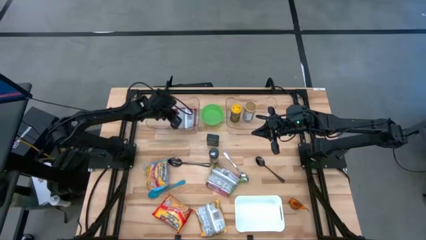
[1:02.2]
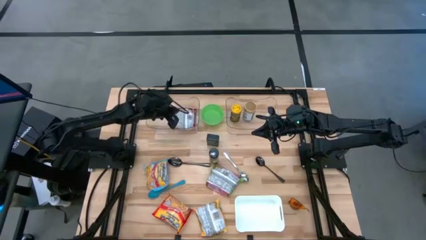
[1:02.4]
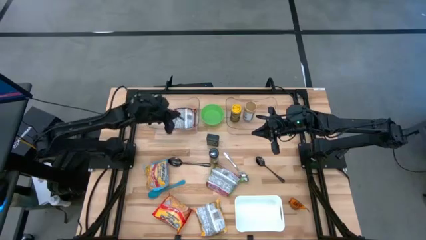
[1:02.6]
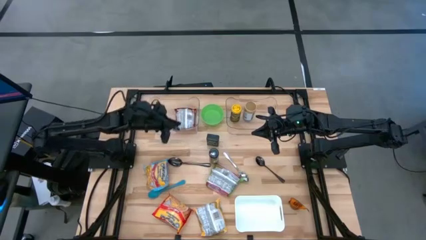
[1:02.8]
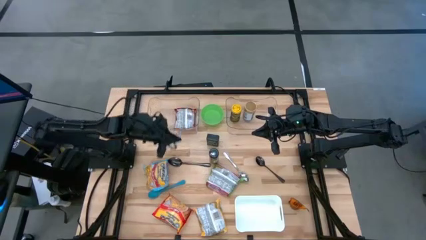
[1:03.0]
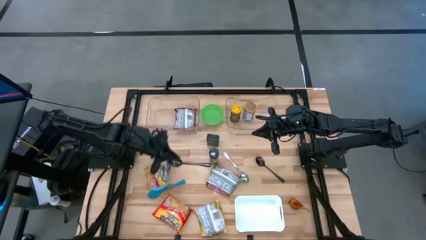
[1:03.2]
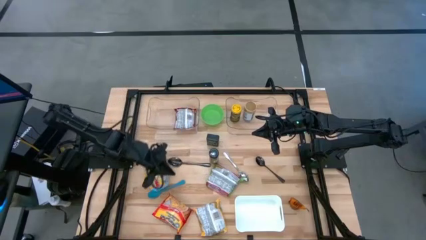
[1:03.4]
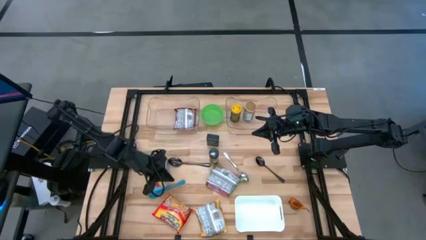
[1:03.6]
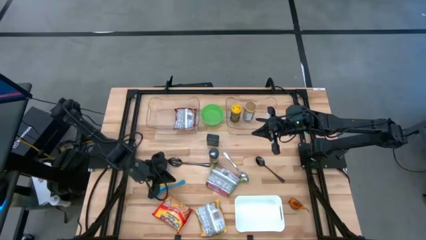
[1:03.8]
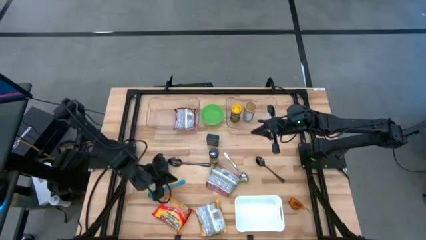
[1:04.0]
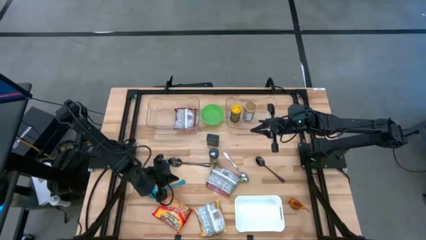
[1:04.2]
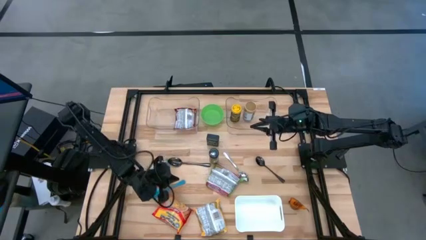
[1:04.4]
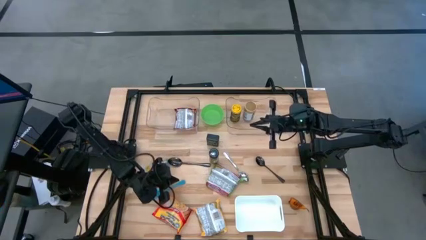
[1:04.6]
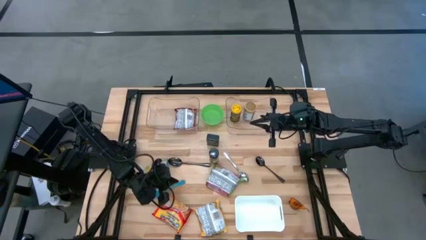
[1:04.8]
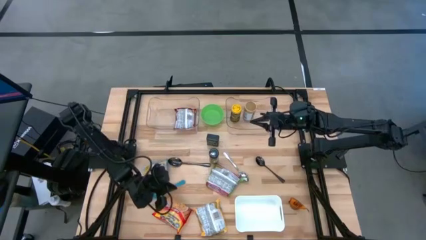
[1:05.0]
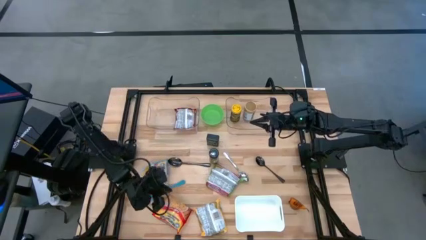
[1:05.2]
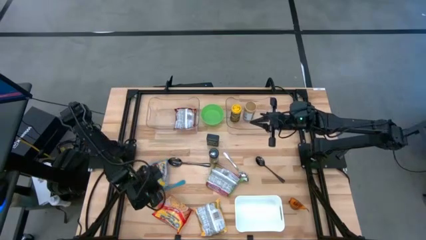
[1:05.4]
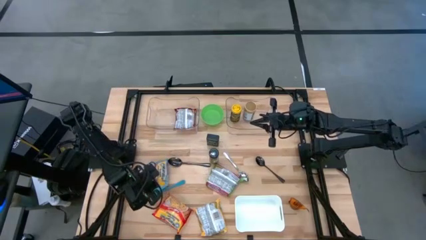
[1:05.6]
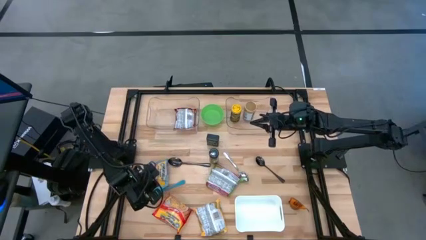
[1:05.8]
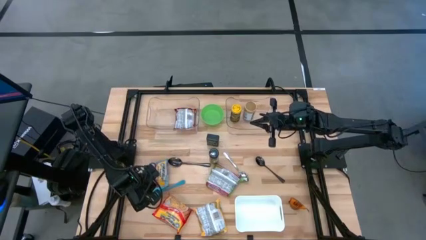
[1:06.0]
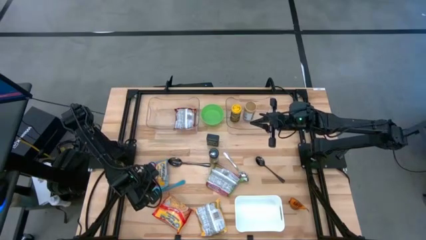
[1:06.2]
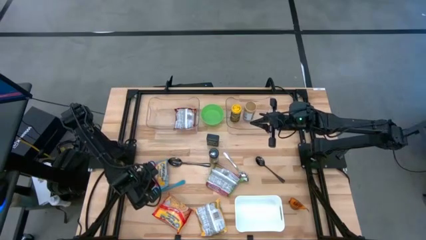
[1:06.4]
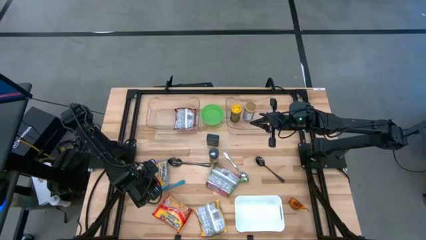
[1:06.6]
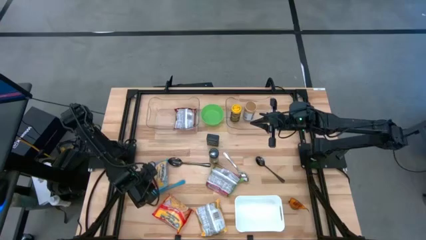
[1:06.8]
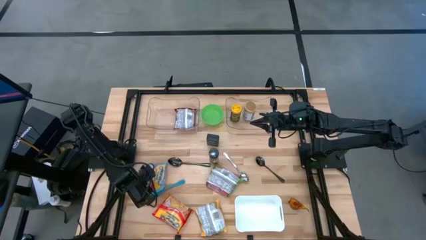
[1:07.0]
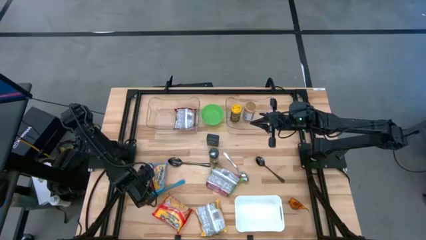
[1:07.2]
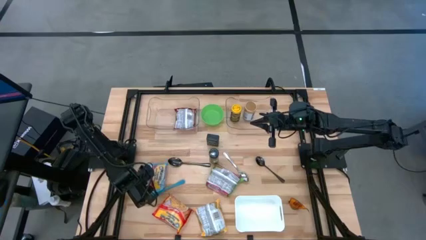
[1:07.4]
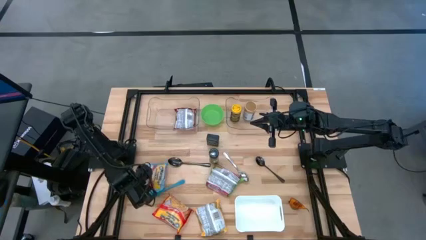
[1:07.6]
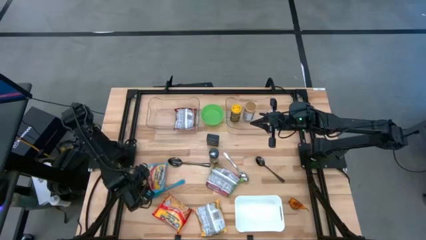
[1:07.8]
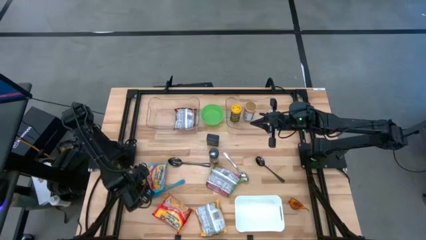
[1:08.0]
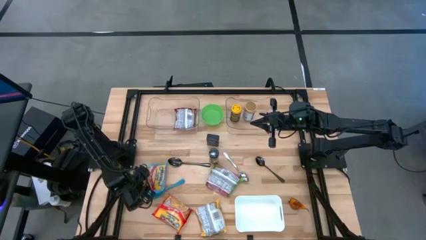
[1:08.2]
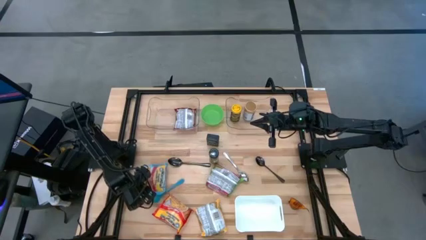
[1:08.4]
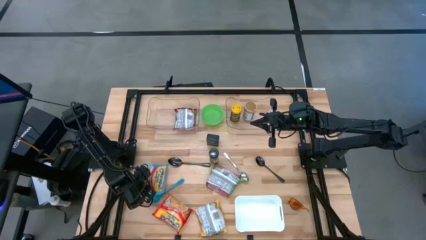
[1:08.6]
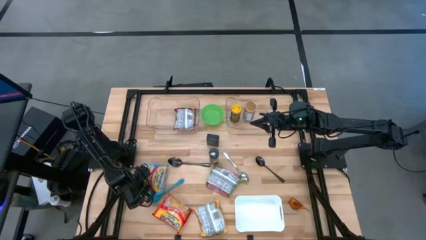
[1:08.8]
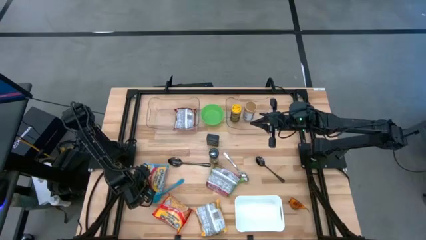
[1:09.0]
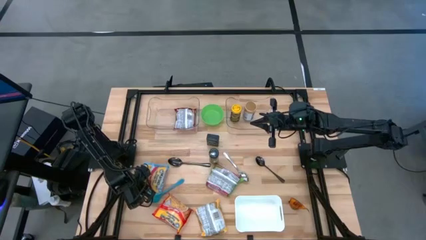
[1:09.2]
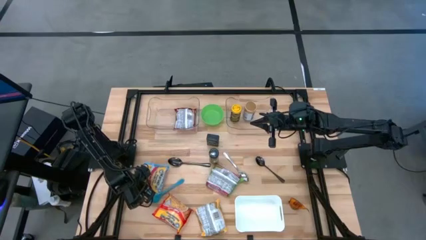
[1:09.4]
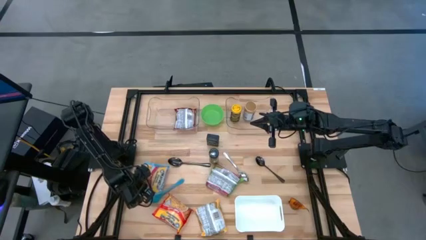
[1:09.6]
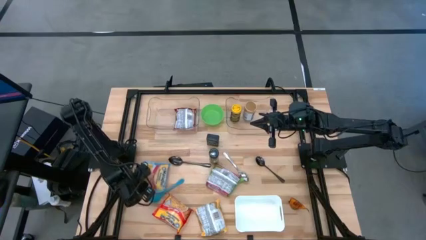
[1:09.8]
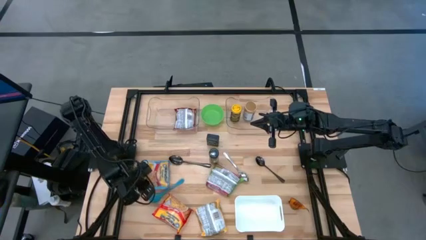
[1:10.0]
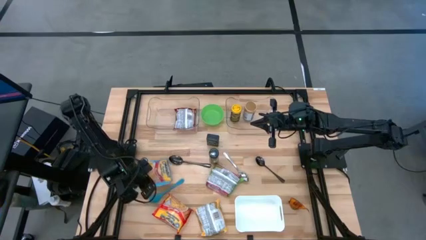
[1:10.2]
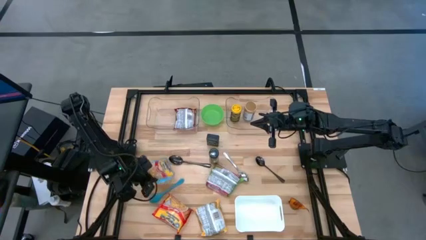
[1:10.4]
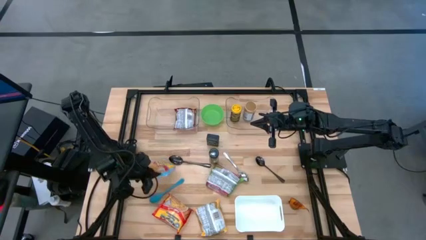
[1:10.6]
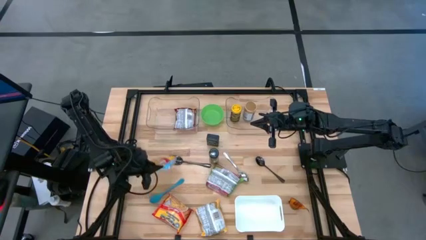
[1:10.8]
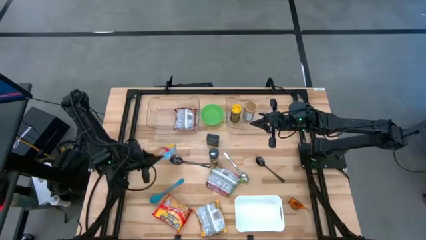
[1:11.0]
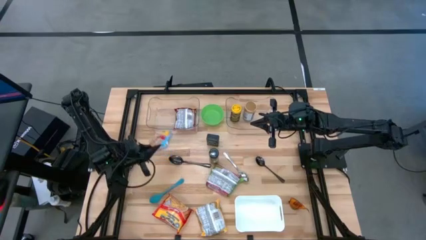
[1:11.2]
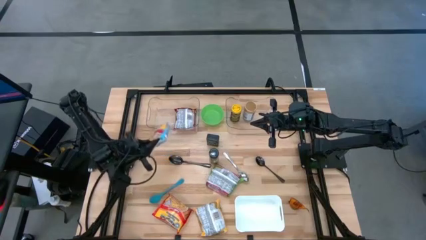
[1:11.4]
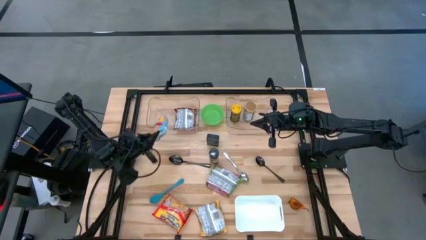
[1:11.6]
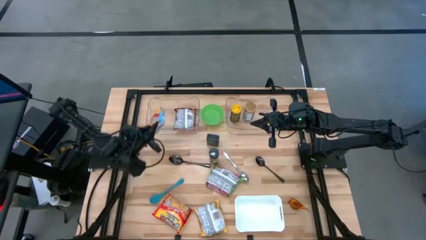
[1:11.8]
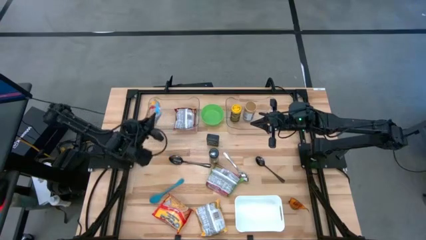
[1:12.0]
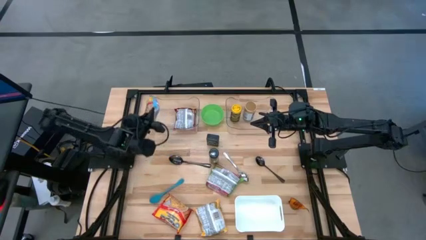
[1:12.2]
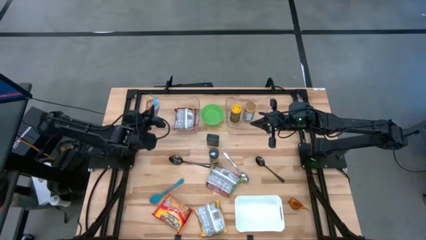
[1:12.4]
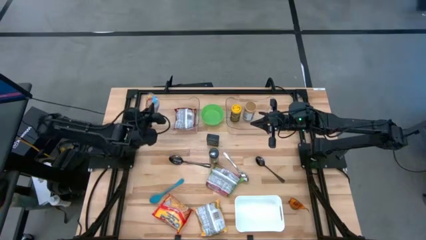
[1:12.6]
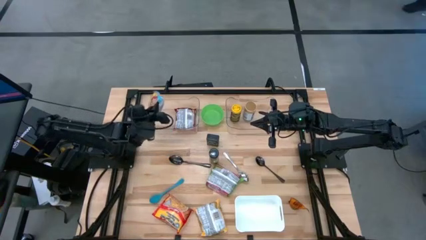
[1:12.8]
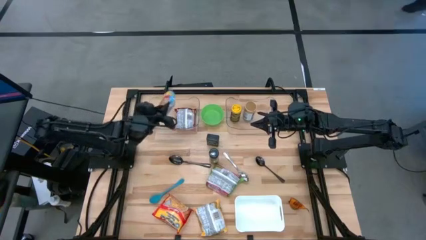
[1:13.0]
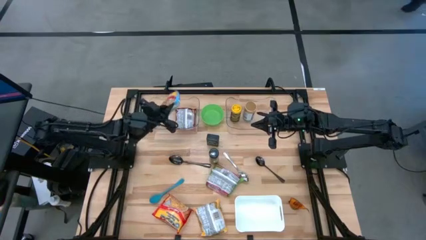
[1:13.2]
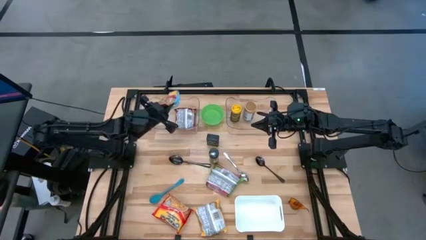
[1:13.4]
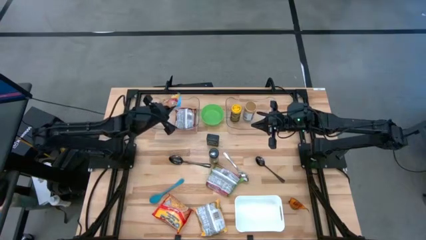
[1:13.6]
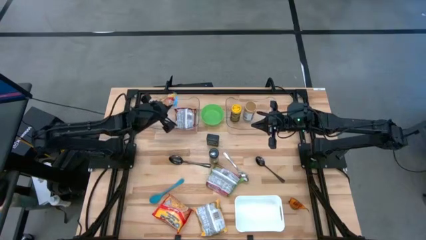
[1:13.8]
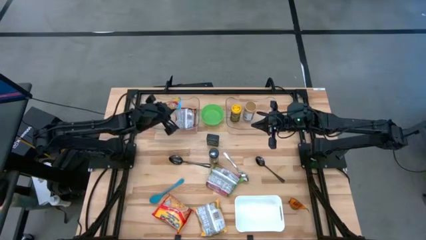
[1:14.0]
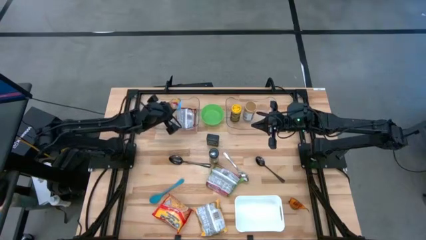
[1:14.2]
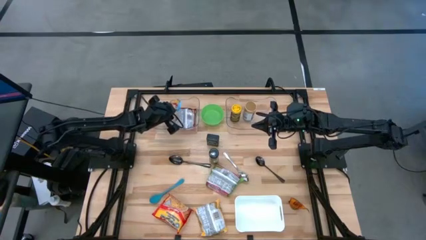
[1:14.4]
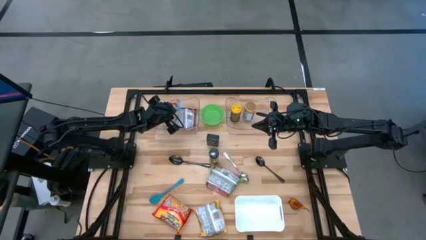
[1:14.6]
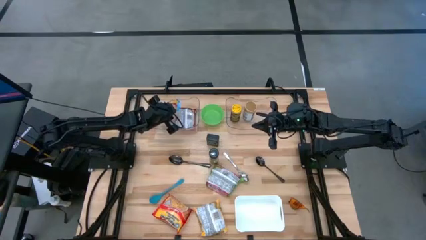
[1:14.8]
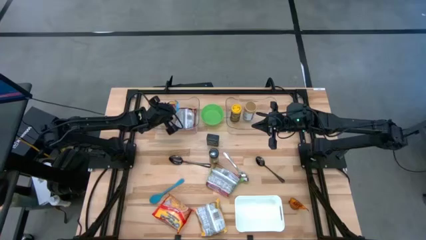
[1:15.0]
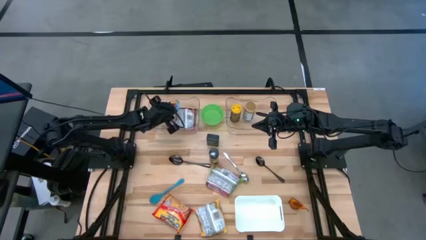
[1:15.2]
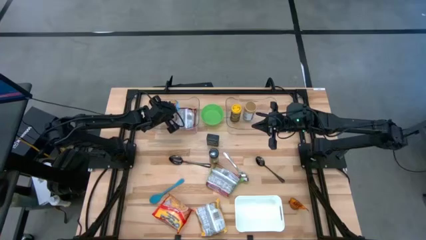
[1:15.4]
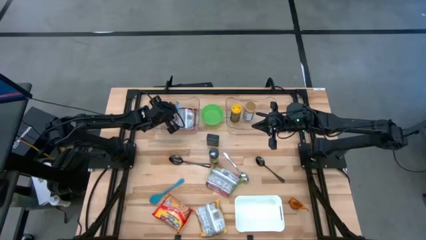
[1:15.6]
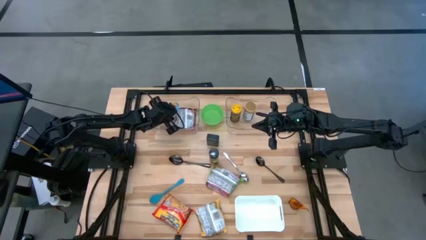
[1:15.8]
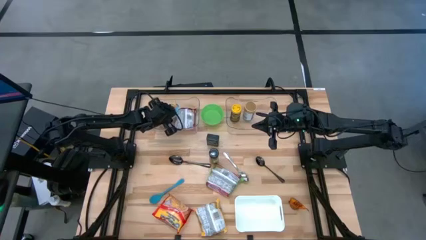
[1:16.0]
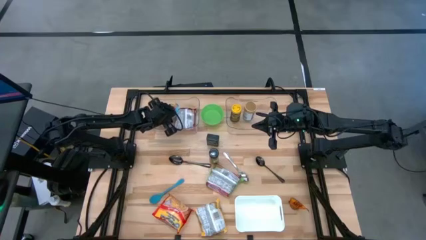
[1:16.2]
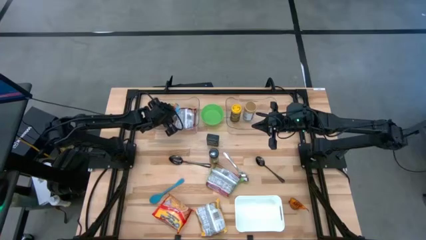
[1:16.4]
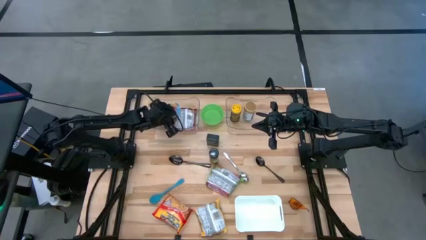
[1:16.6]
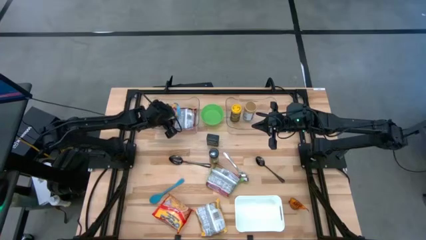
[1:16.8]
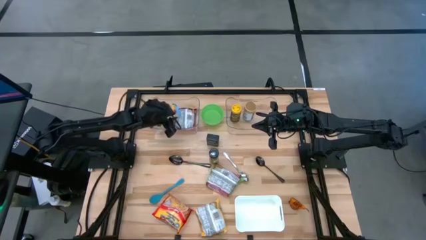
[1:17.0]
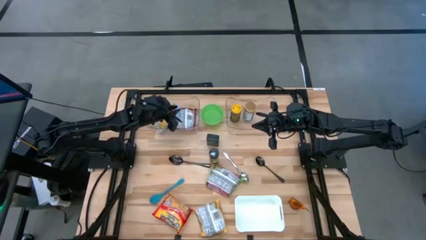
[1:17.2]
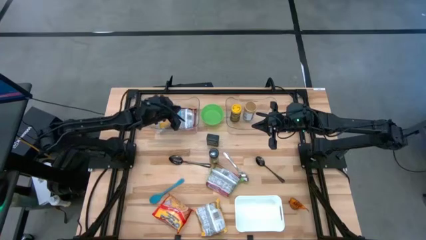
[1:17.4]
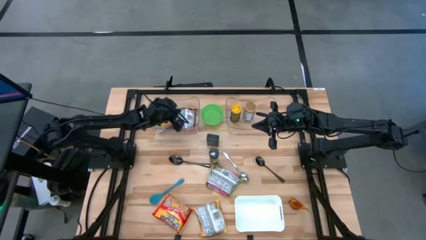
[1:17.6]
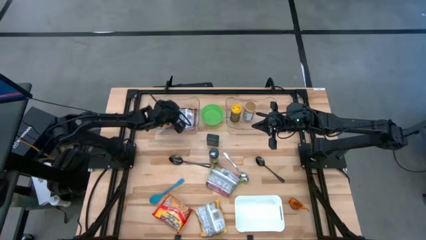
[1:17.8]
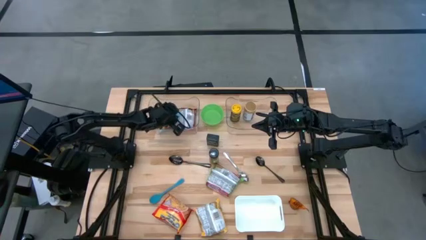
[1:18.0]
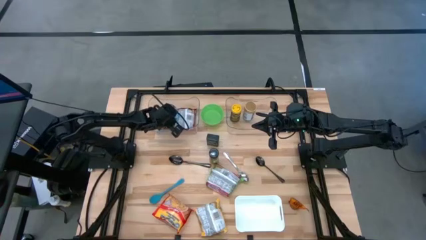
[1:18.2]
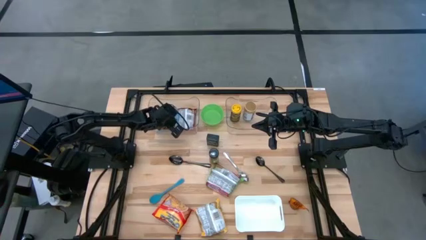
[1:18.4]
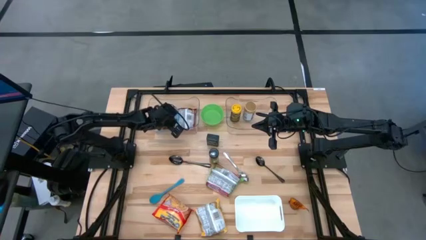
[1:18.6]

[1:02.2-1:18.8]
Task: Pick & Place Food Item
Put the blue noodle pack in the left transparent bin
